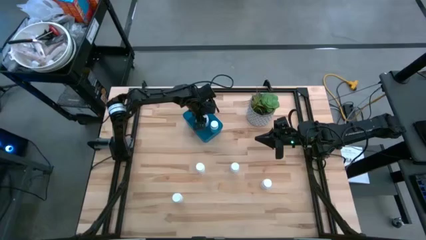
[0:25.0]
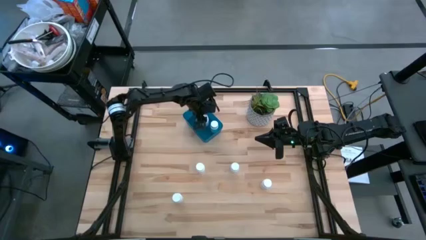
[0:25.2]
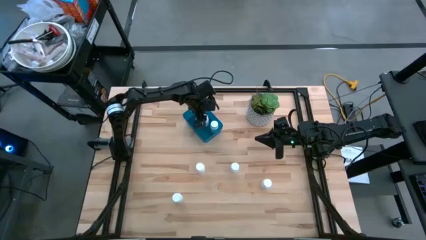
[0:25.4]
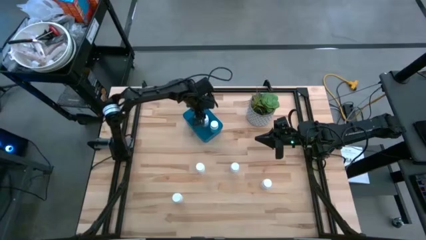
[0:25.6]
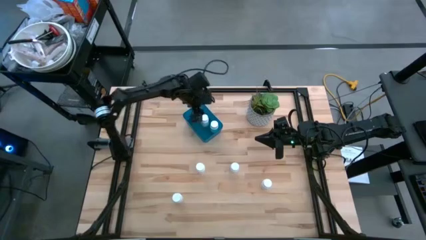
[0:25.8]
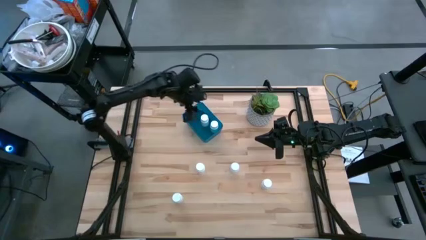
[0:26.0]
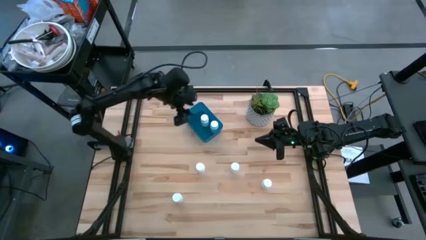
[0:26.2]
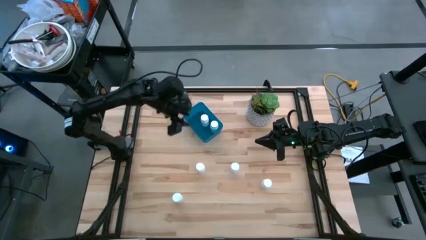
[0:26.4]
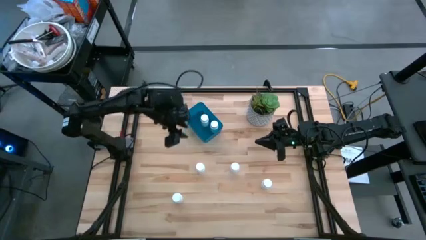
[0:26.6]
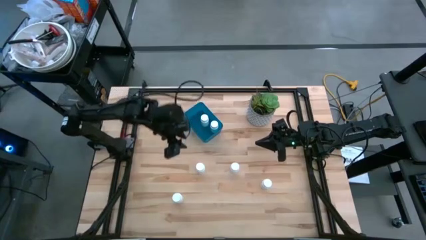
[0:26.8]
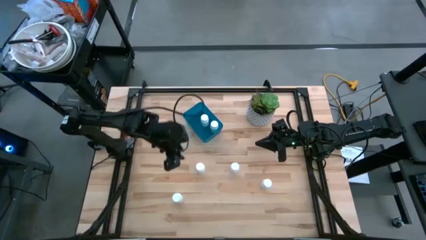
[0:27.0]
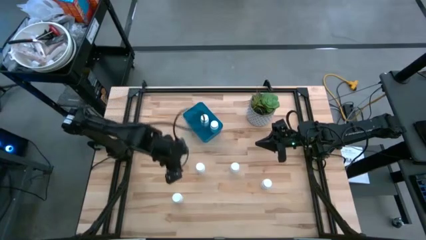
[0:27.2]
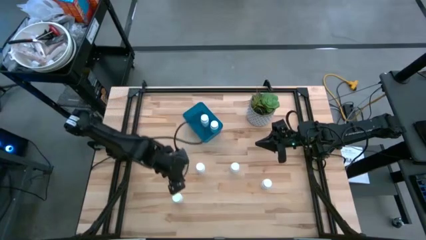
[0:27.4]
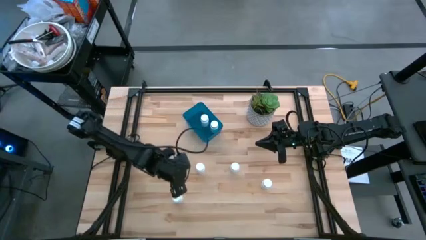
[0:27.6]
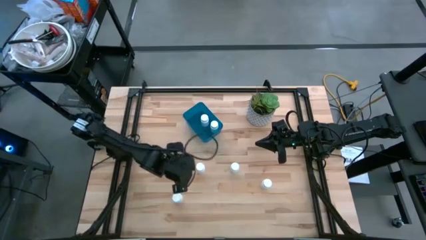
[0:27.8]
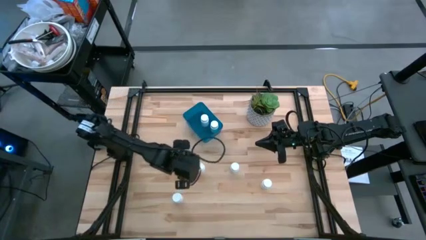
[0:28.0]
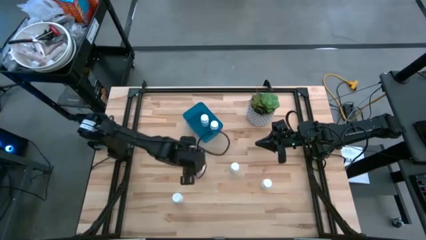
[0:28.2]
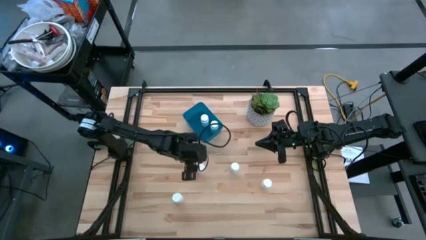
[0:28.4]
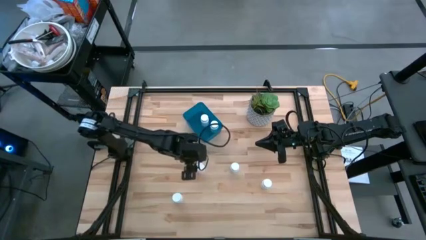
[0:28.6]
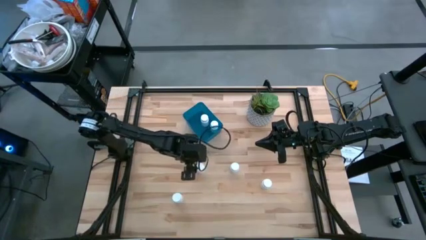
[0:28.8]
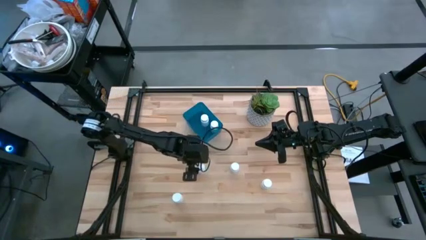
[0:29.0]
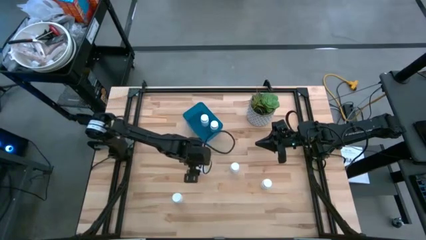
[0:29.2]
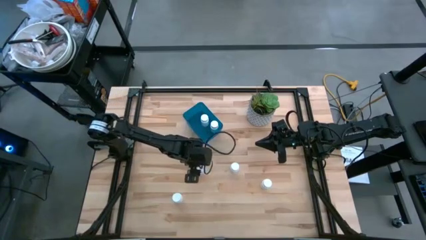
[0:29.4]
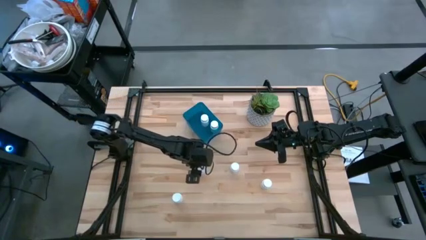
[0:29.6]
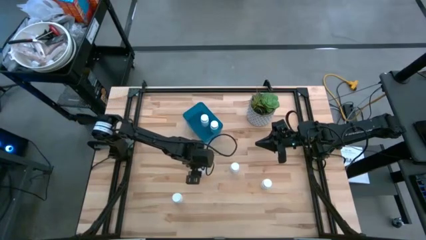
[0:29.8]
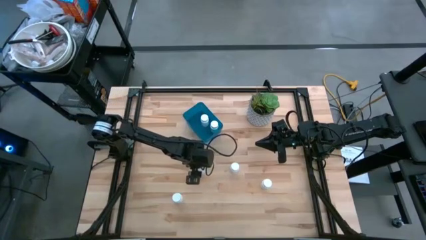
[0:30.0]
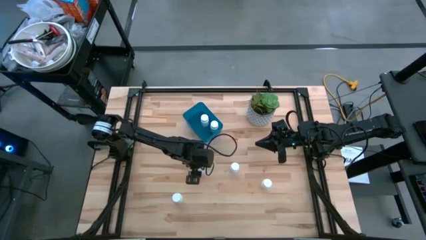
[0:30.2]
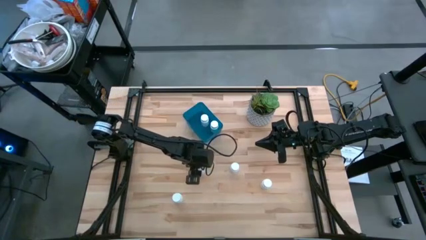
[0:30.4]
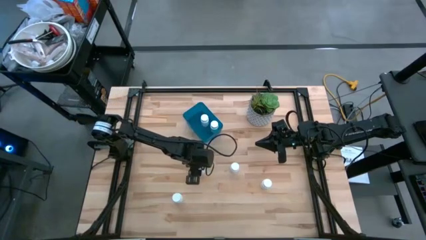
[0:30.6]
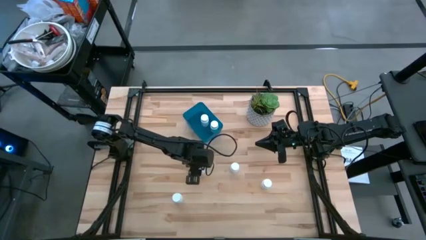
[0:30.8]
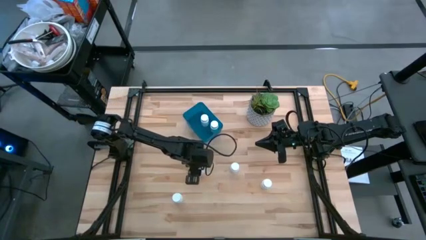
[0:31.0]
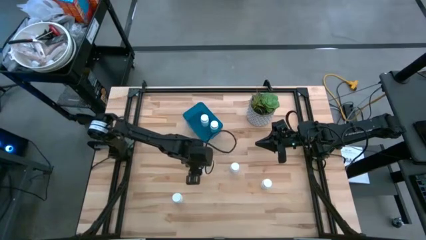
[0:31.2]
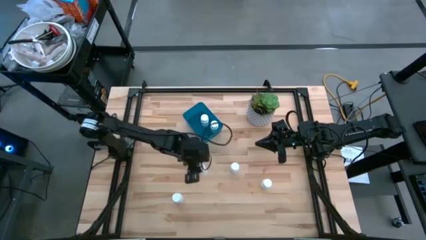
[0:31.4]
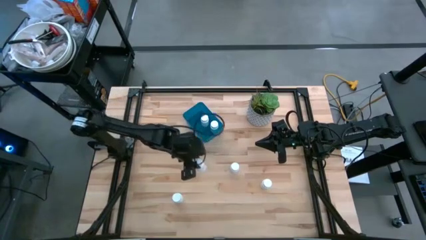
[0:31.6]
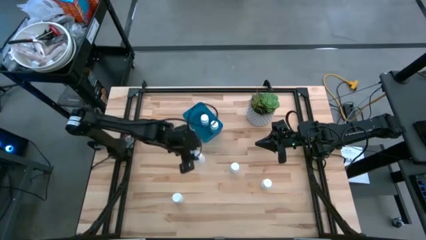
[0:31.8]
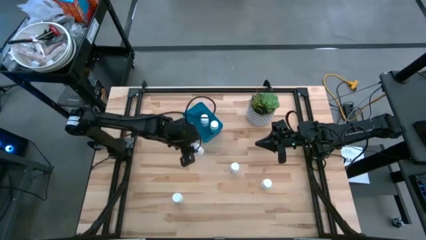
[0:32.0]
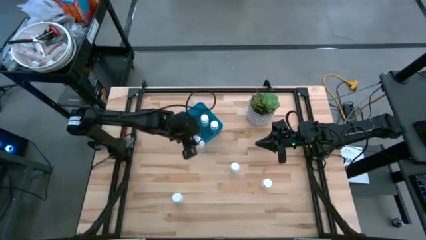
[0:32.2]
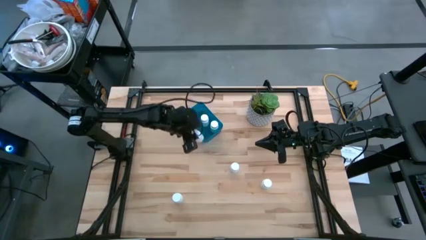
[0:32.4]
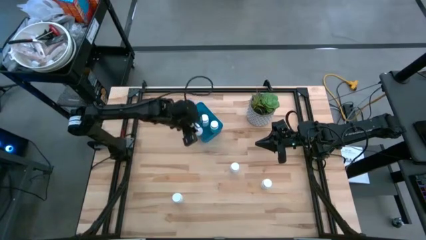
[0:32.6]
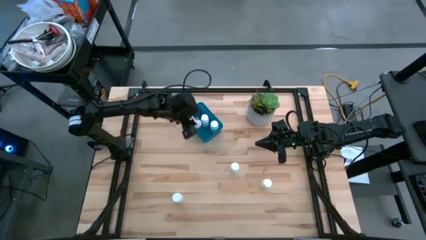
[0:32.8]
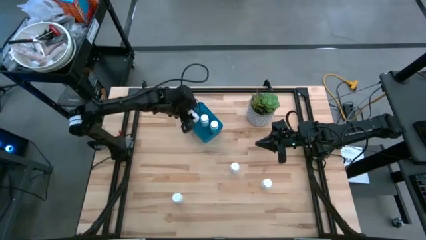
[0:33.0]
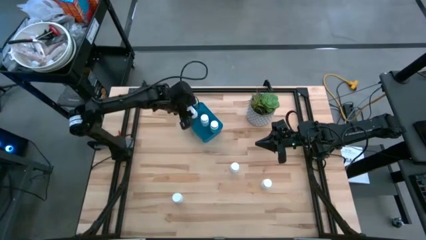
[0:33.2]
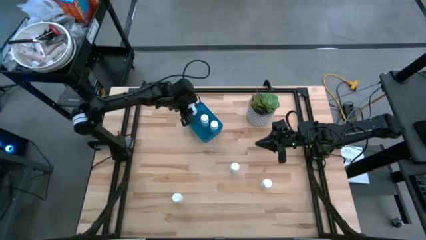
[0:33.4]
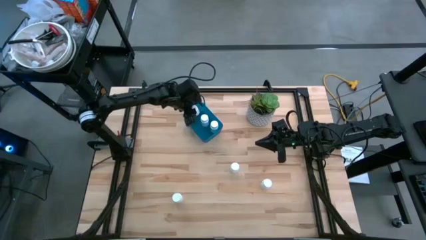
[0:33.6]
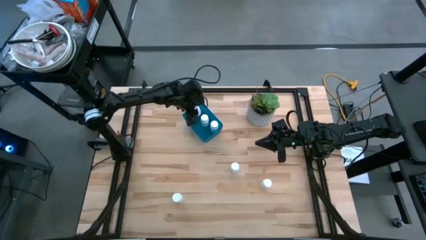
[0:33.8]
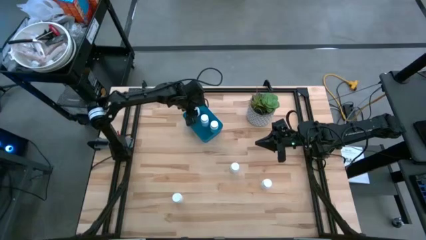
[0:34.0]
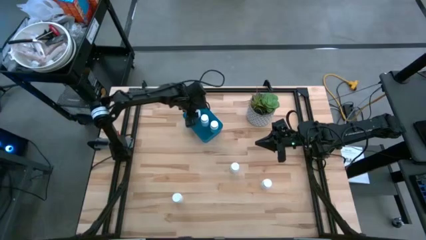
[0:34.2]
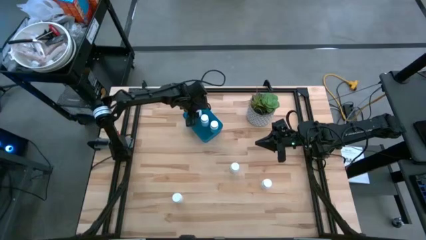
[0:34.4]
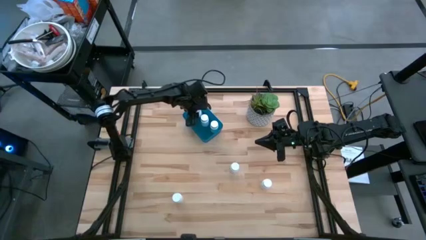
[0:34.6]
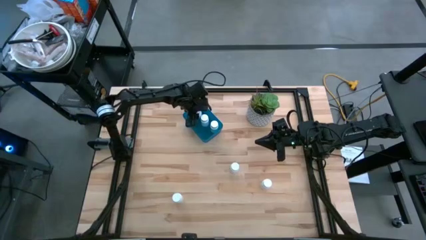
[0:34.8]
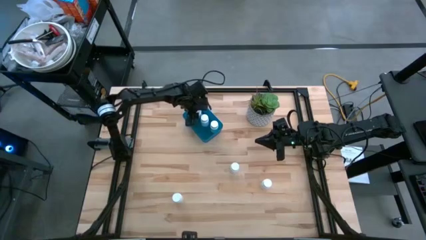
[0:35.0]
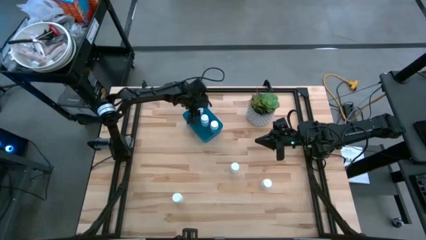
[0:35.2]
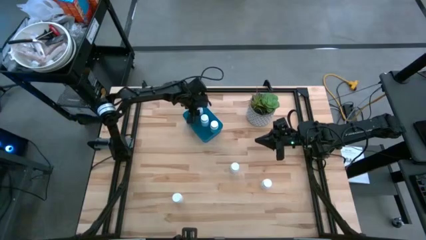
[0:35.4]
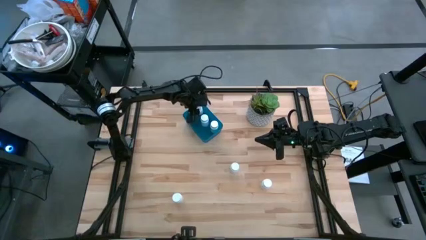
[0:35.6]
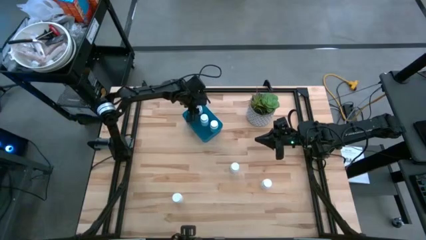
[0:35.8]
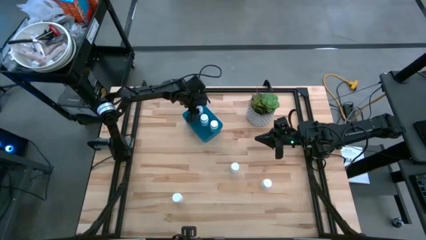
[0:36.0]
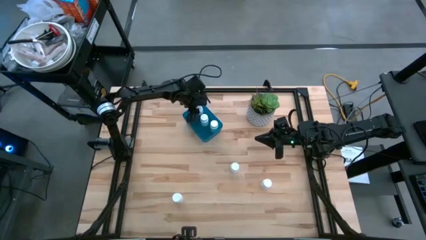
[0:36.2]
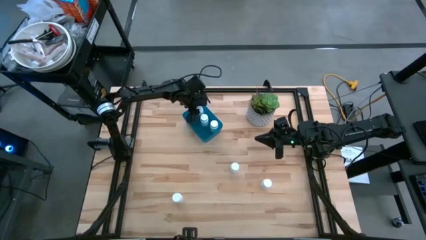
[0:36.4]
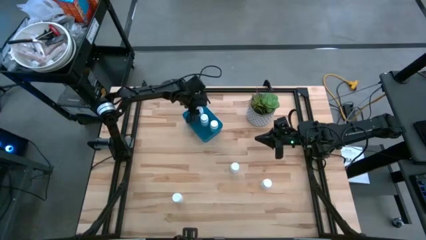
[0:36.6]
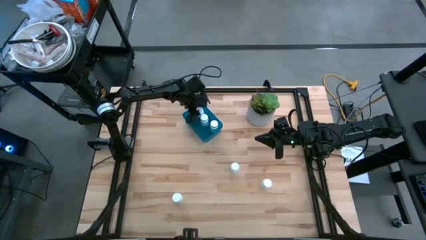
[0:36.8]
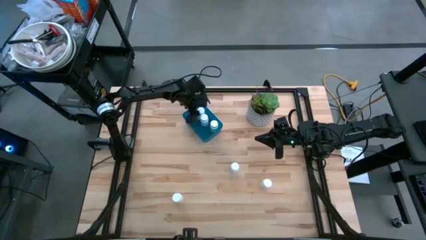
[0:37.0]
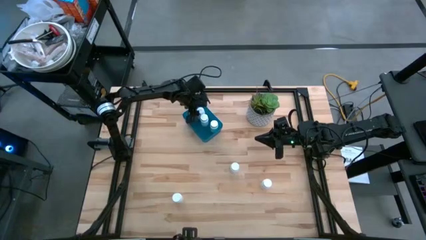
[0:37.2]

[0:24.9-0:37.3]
Task: Pick and place pill bottles into a basket
Put the white pill bottle into the dark blue bin
